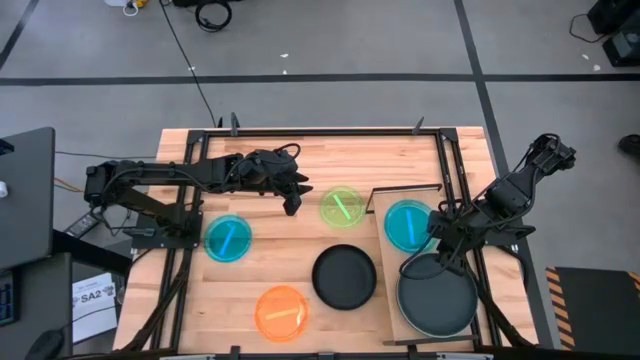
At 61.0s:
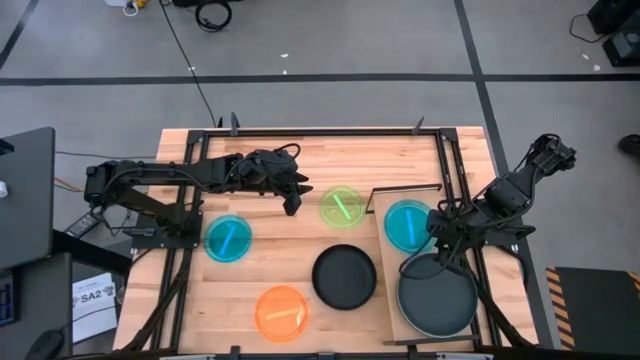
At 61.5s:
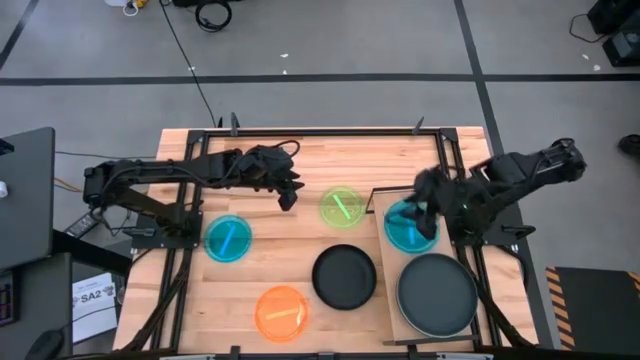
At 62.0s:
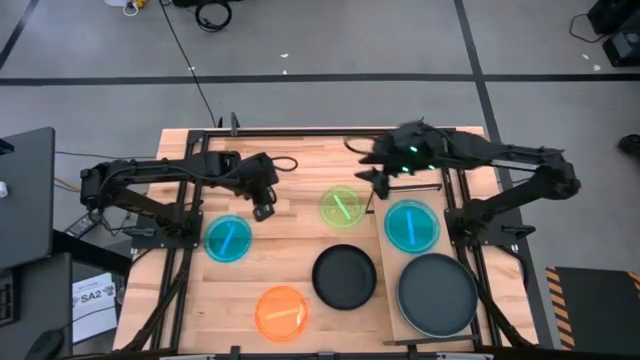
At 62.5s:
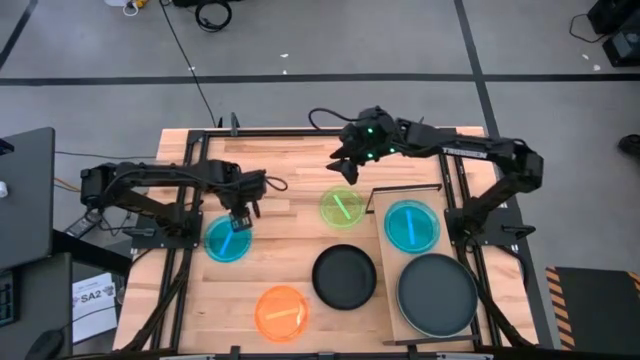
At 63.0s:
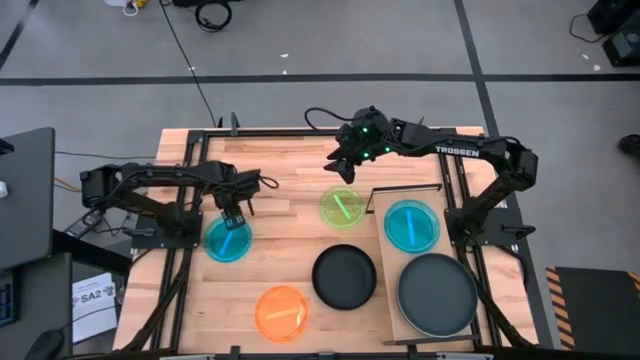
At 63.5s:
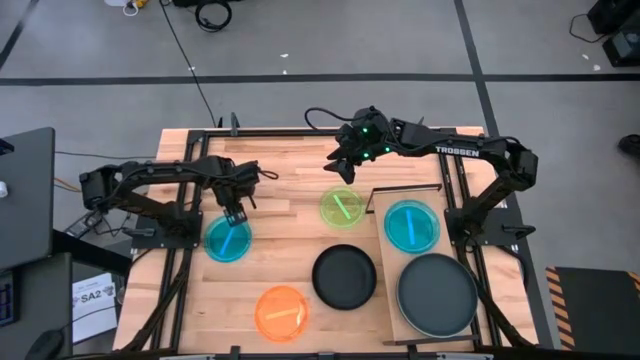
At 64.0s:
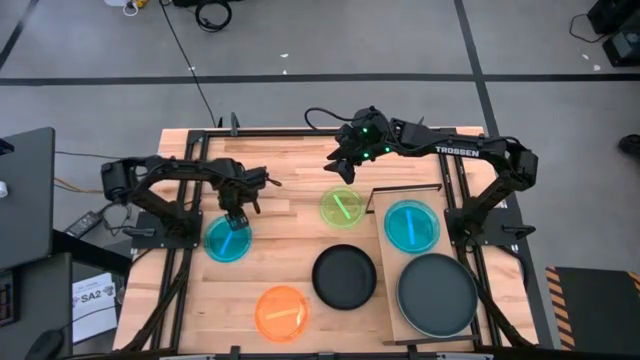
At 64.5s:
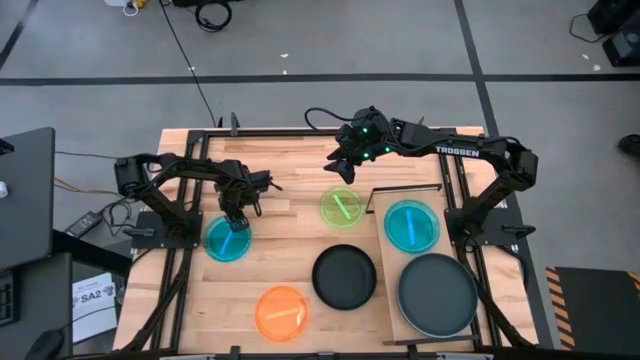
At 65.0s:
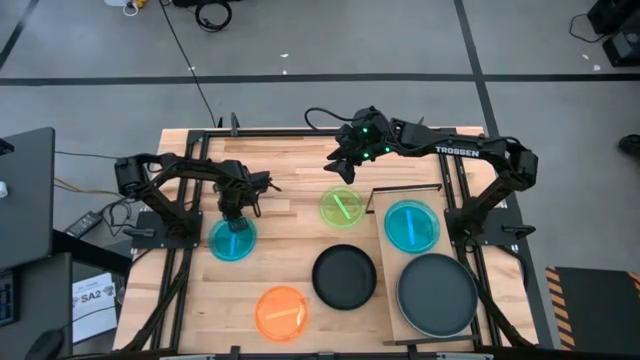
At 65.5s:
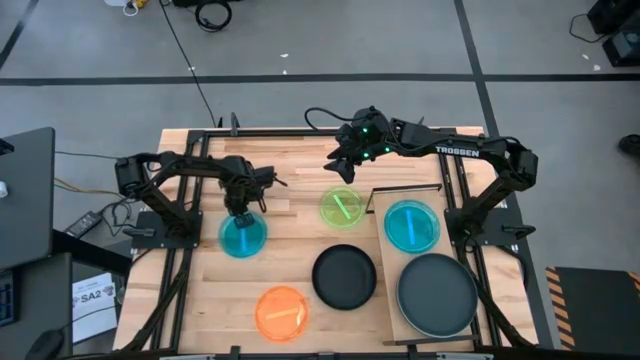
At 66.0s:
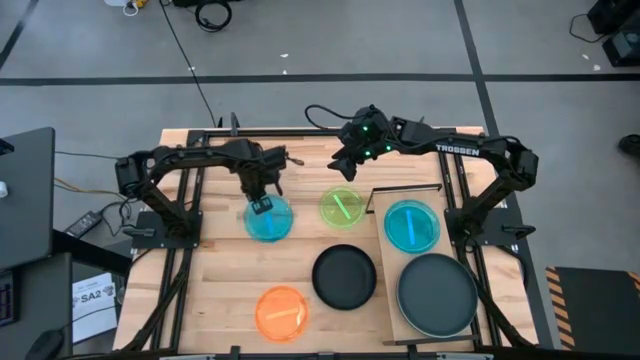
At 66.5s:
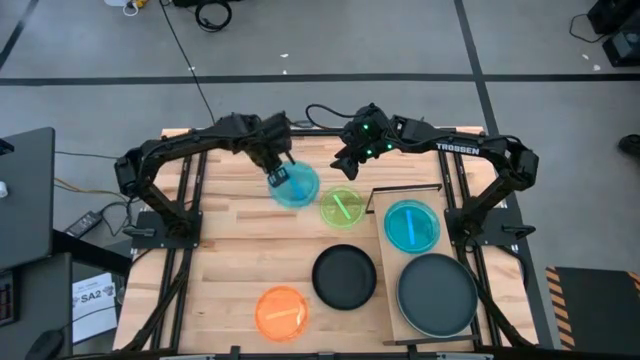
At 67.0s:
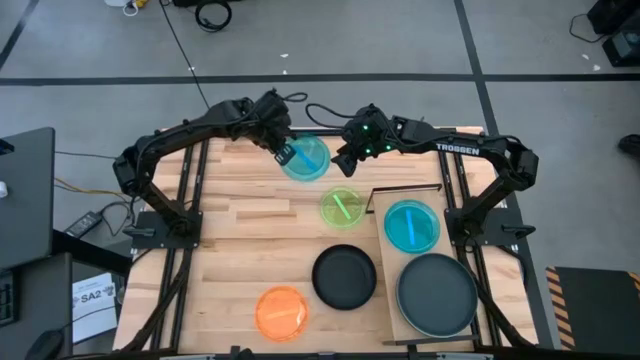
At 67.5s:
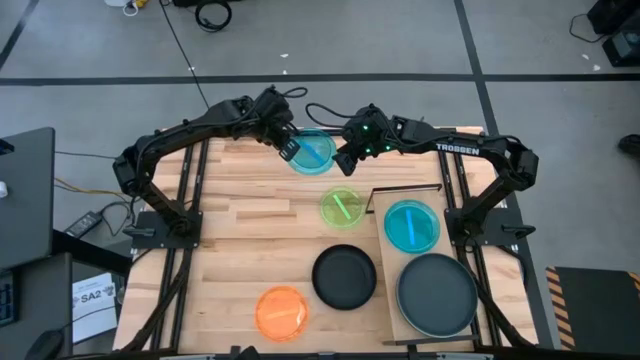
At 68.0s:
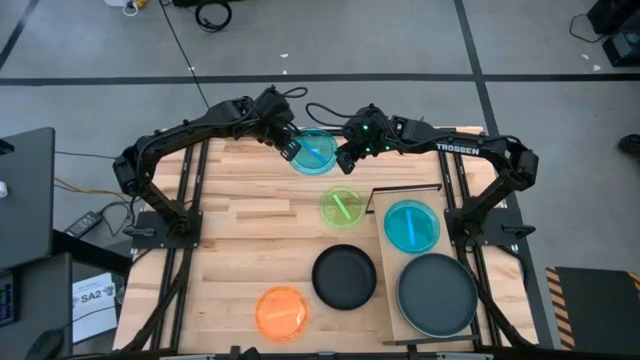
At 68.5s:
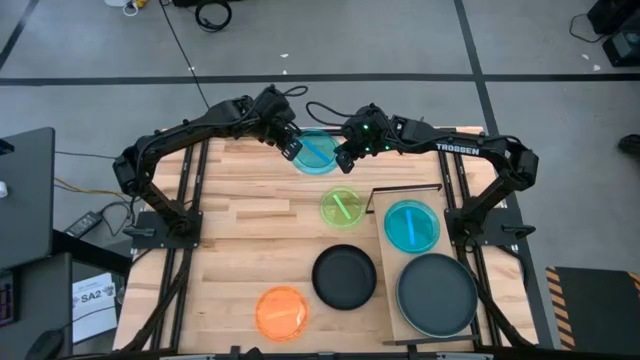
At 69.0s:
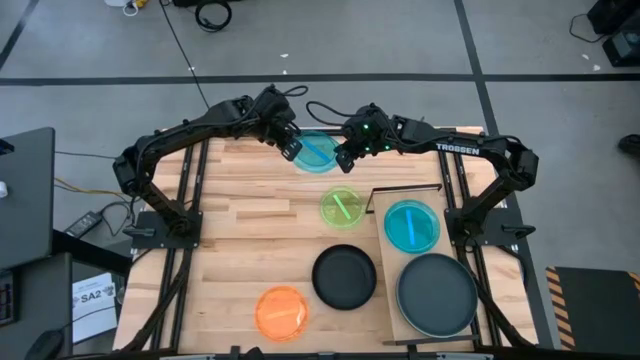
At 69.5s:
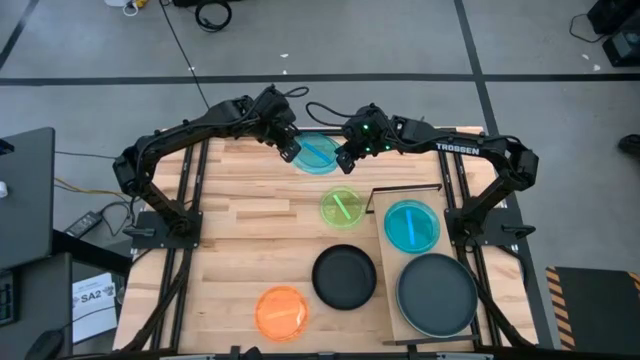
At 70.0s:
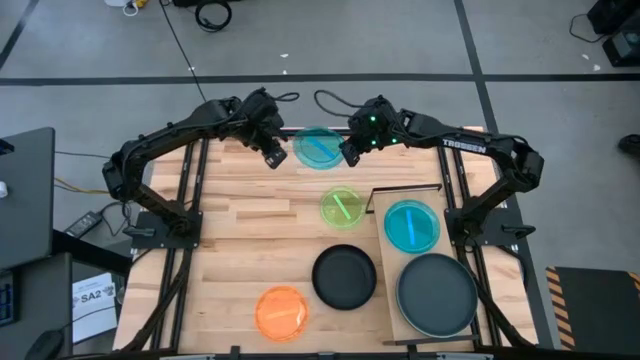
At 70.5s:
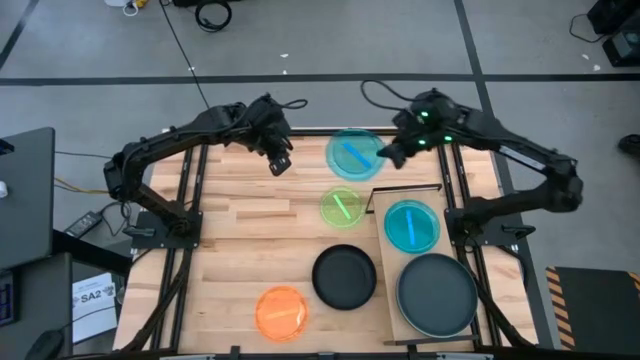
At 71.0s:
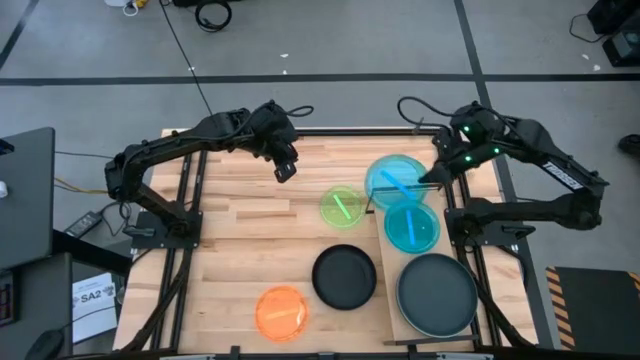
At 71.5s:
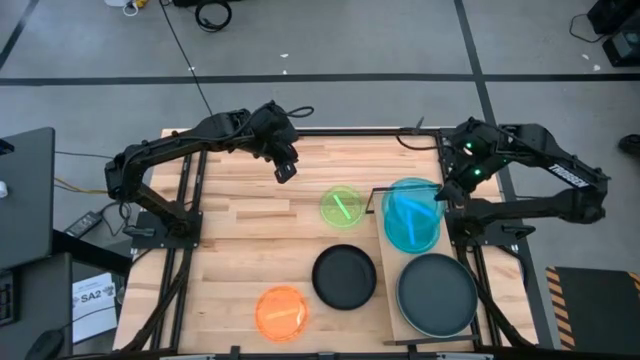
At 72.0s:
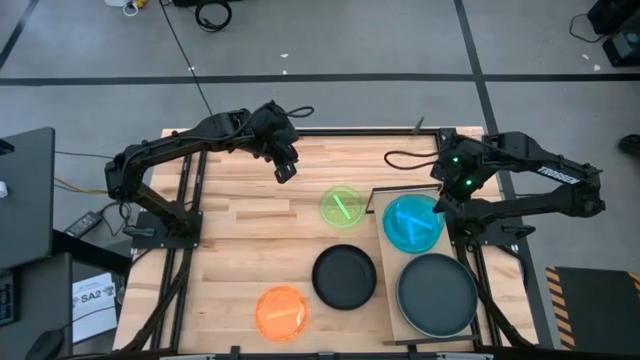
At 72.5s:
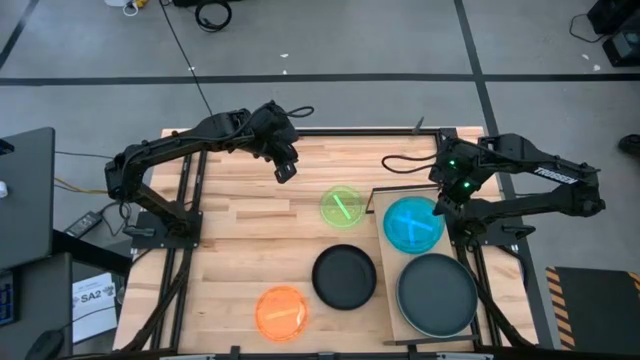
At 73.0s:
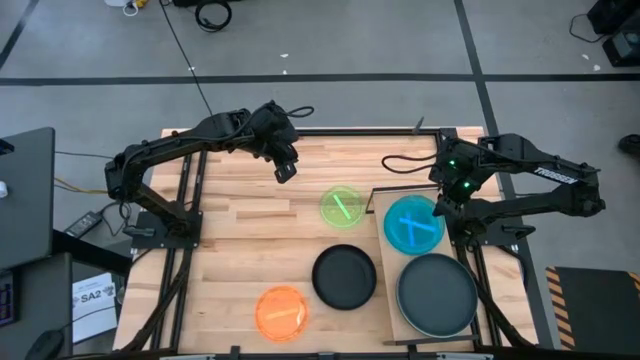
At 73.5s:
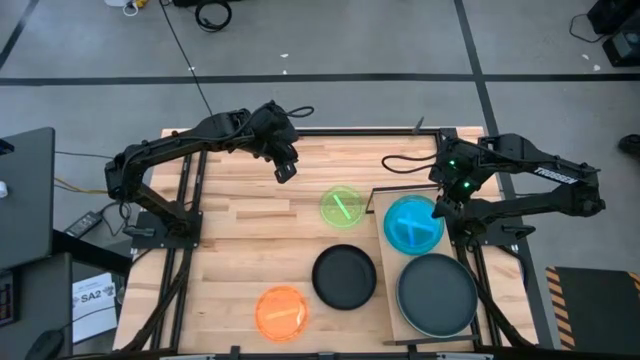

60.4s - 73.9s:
Task: Place and stack plates onto a shelf
Stack the blue plate on top of the blue plate on the shelf

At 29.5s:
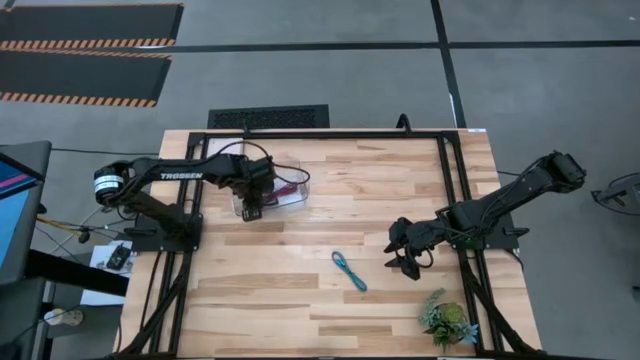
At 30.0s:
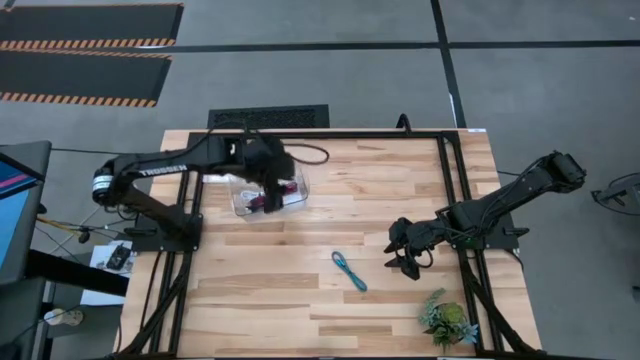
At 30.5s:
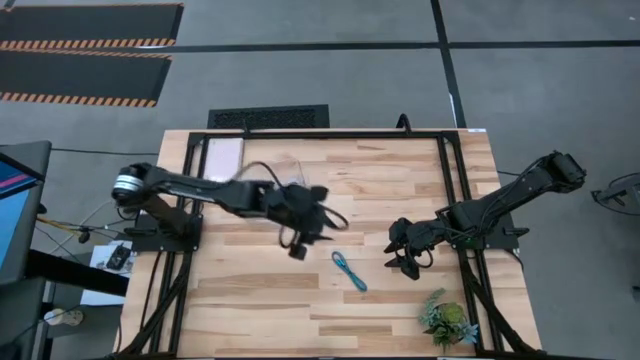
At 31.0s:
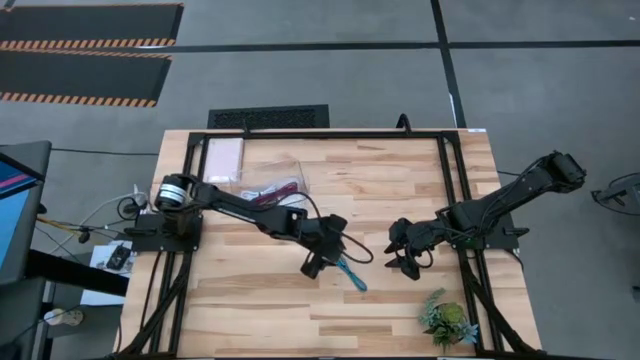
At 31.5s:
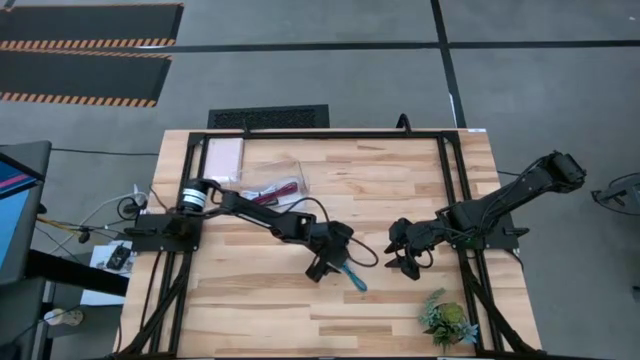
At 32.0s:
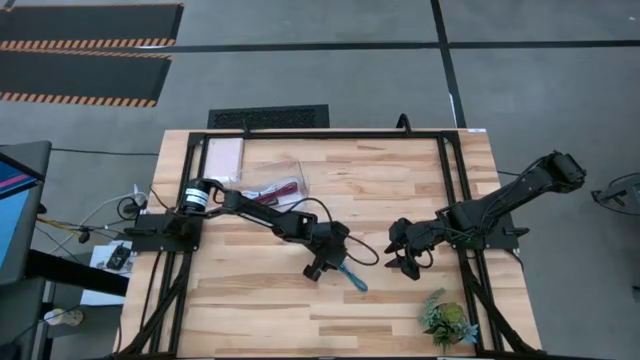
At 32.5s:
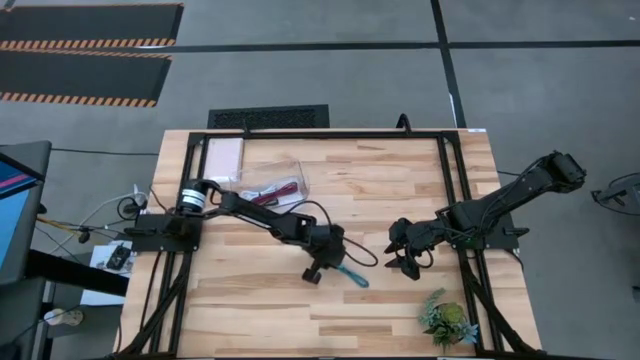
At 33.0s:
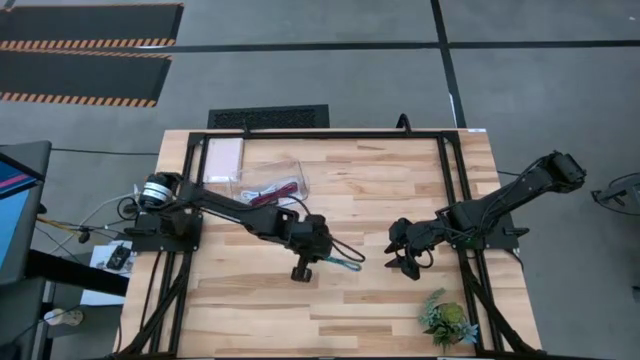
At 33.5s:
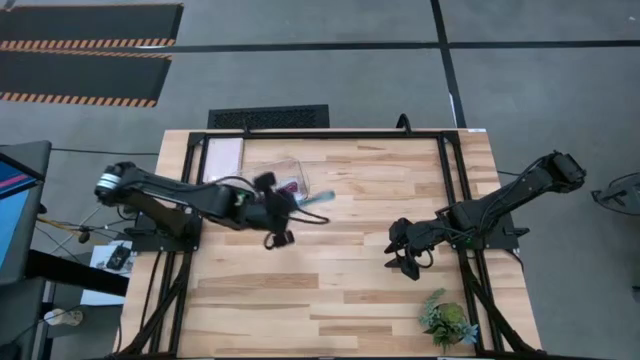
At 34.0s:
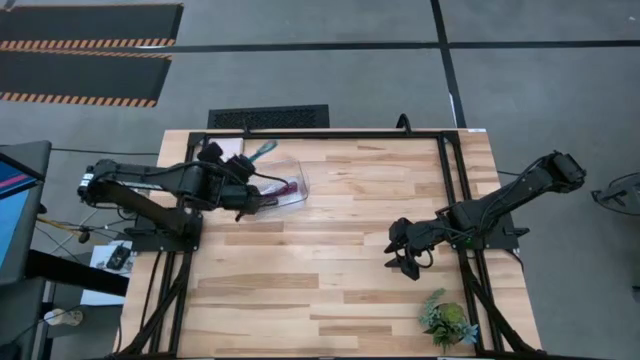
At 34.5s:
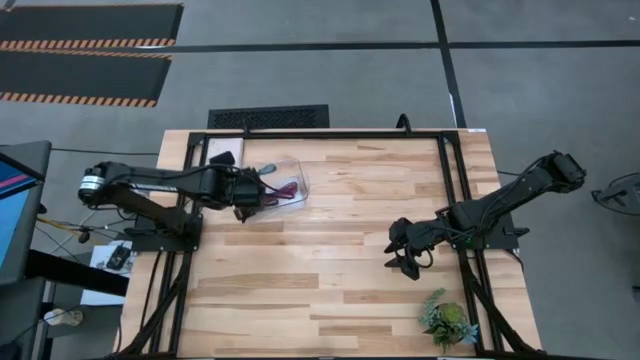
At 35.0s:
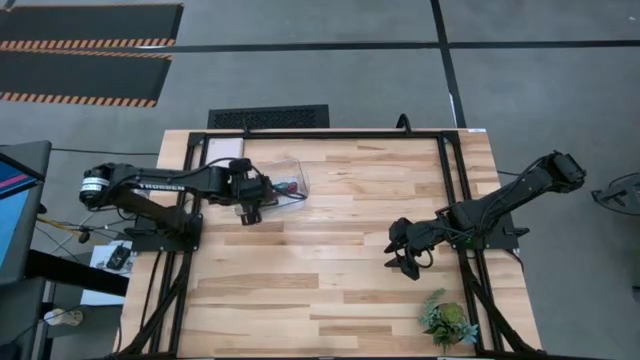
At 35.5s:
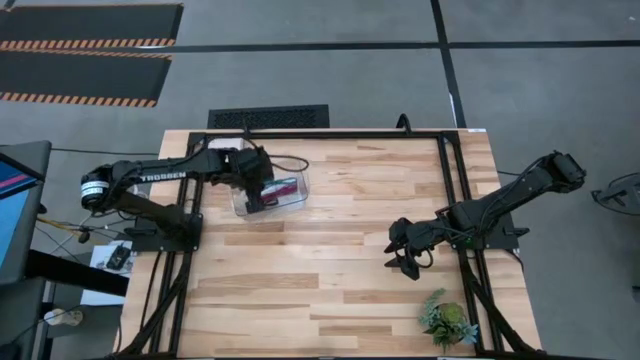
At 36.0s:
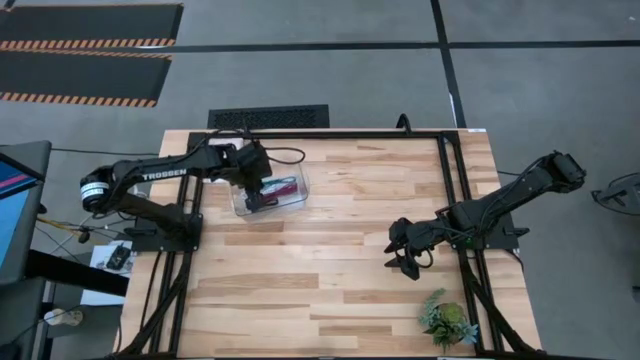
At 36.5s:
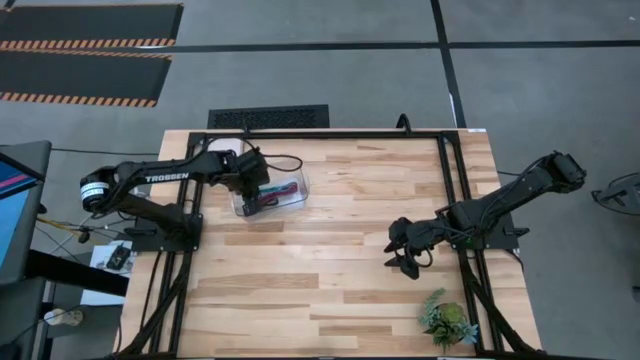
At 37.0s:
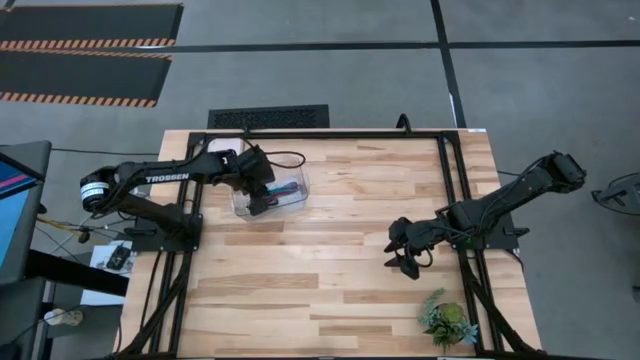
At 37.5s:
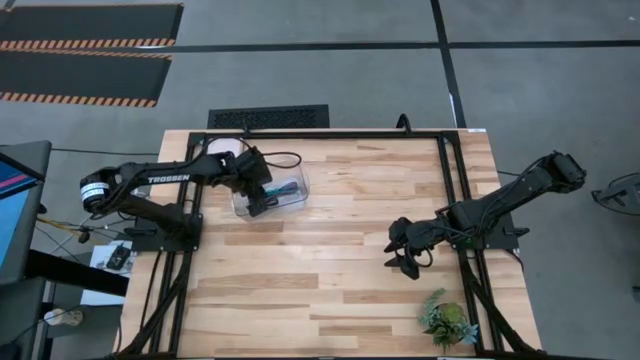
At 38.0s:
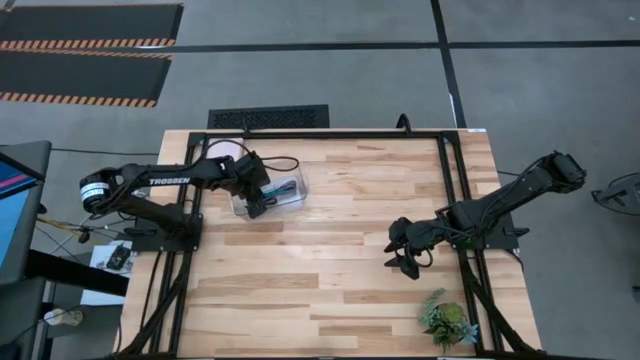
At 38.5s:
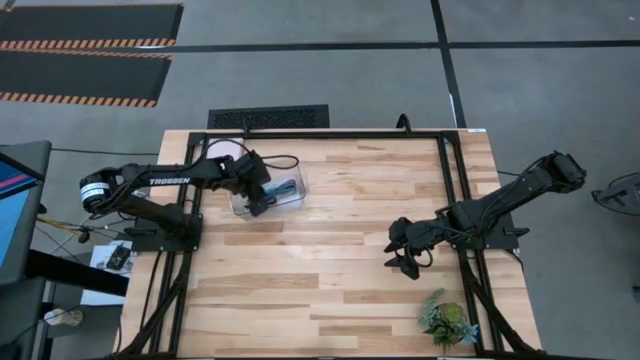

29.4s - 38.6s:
Task: Pick and place USB-C Cables
Put the blue usb cable into the transparent bin
